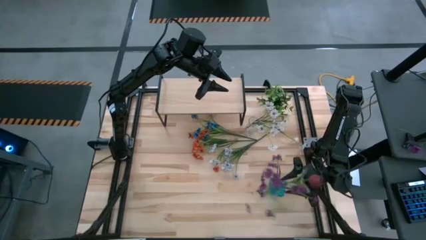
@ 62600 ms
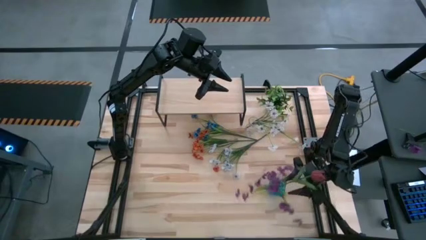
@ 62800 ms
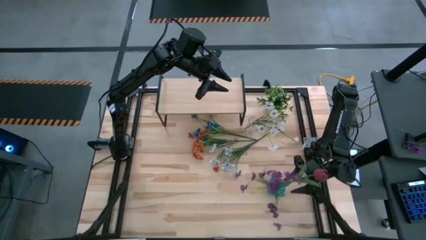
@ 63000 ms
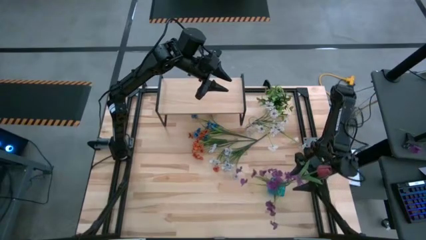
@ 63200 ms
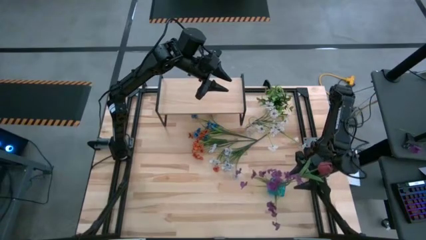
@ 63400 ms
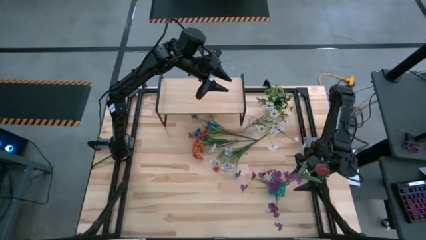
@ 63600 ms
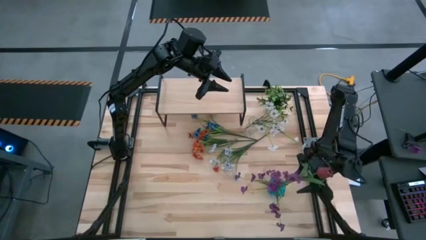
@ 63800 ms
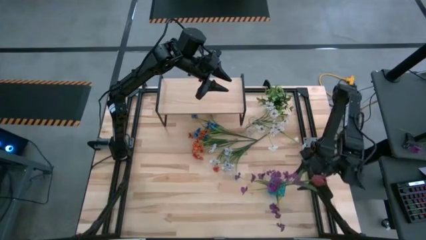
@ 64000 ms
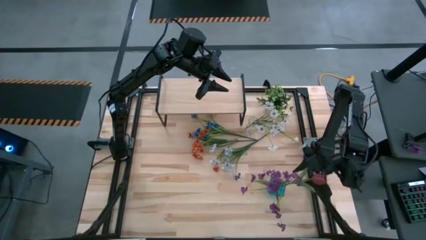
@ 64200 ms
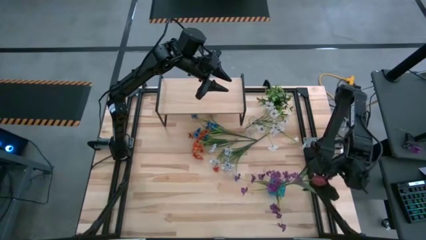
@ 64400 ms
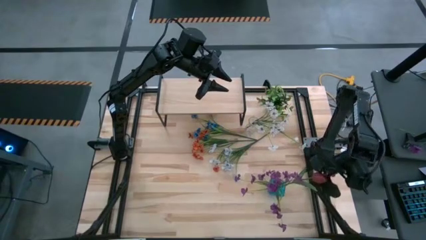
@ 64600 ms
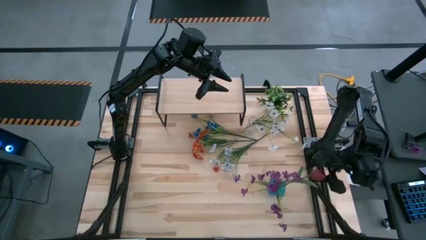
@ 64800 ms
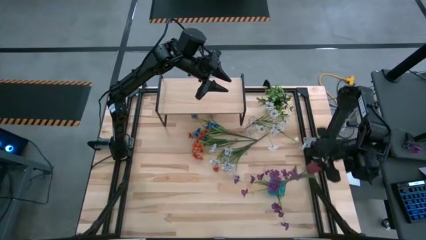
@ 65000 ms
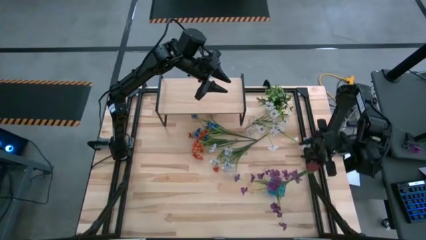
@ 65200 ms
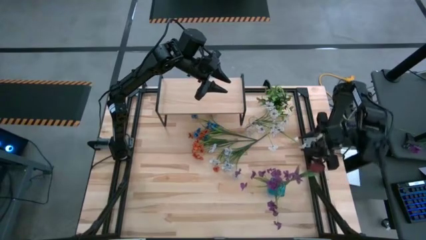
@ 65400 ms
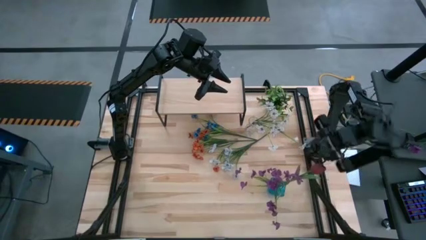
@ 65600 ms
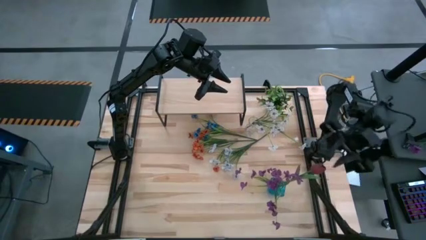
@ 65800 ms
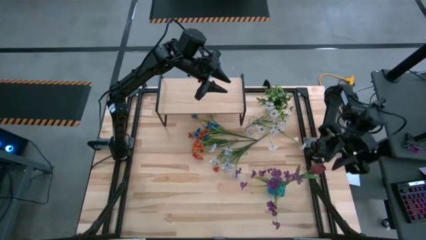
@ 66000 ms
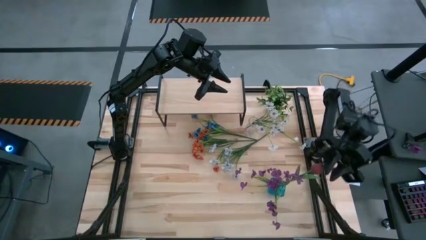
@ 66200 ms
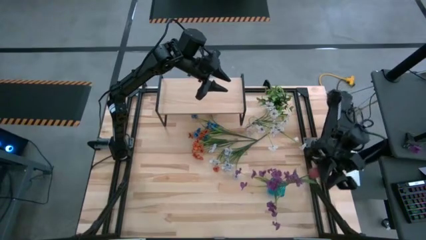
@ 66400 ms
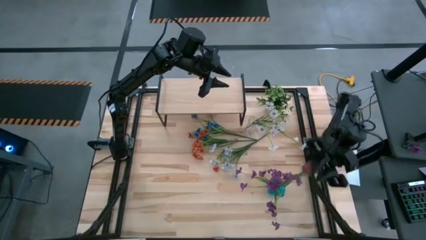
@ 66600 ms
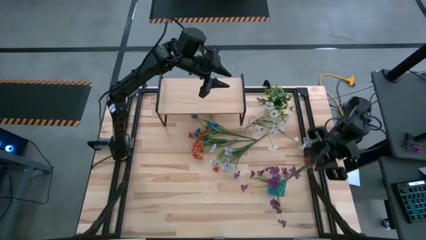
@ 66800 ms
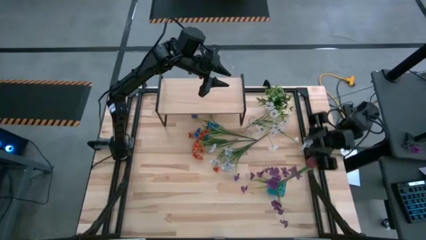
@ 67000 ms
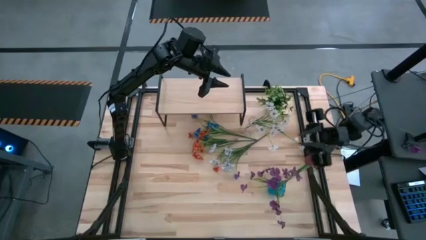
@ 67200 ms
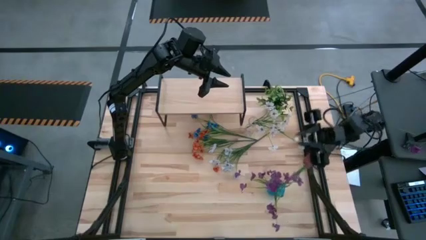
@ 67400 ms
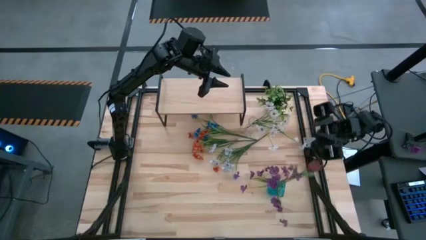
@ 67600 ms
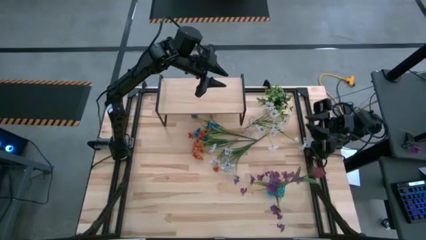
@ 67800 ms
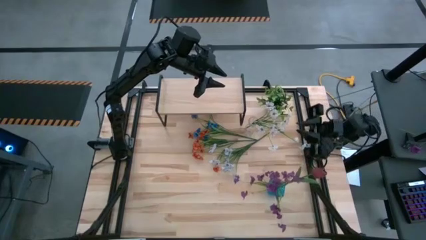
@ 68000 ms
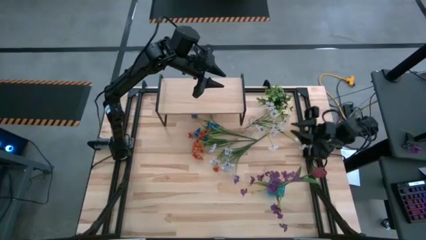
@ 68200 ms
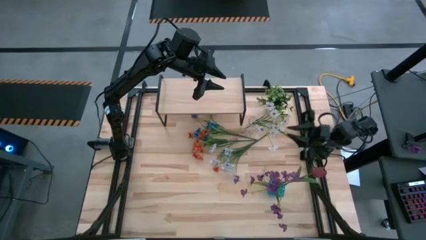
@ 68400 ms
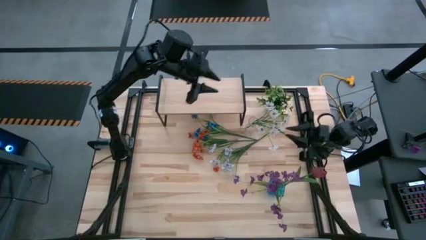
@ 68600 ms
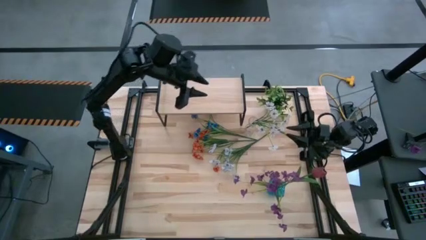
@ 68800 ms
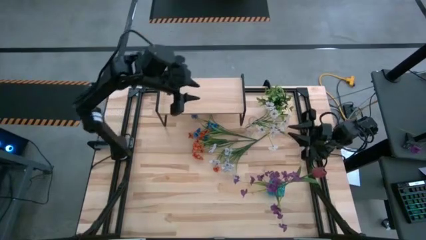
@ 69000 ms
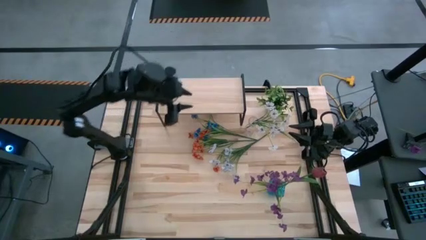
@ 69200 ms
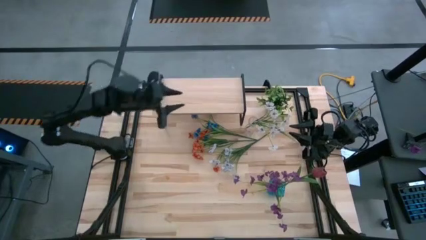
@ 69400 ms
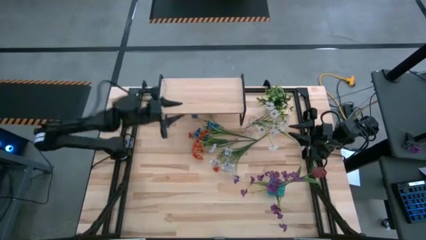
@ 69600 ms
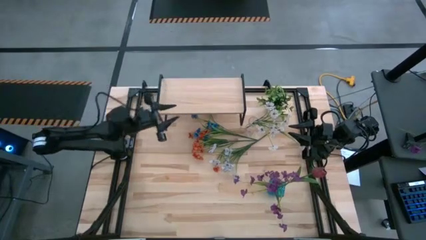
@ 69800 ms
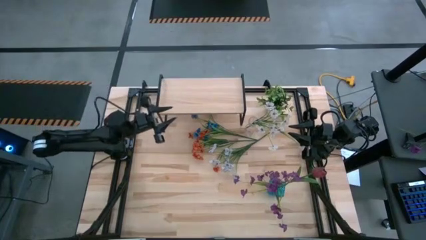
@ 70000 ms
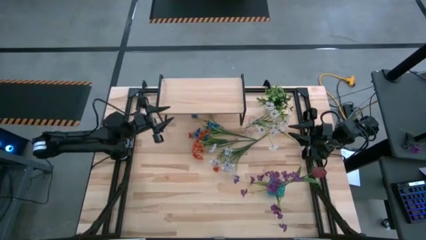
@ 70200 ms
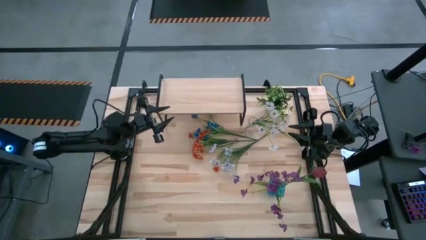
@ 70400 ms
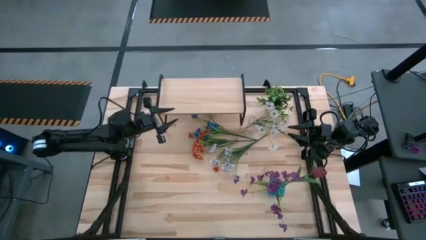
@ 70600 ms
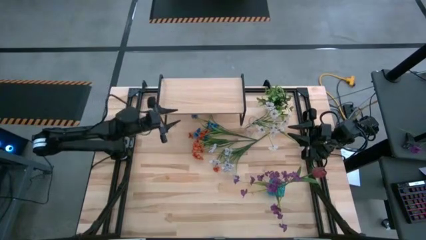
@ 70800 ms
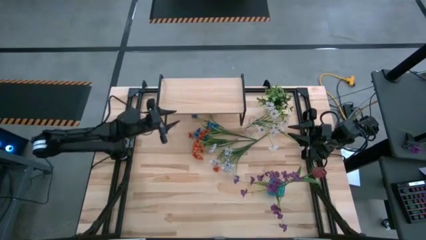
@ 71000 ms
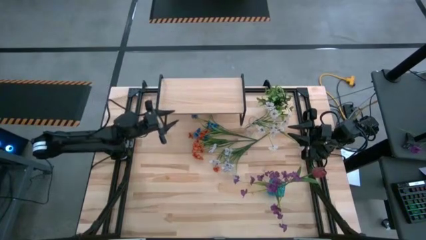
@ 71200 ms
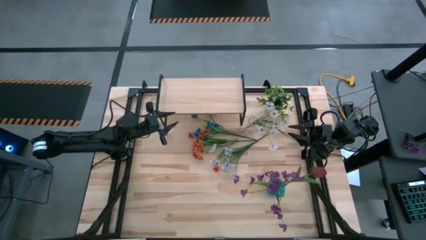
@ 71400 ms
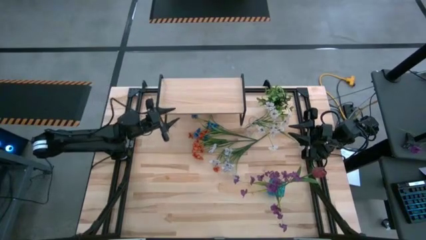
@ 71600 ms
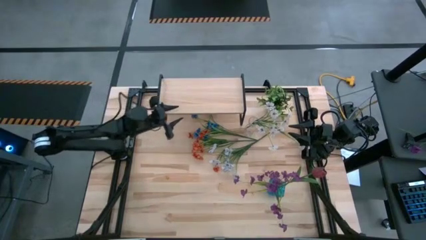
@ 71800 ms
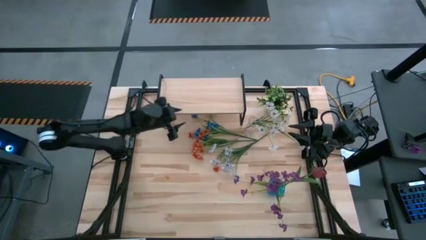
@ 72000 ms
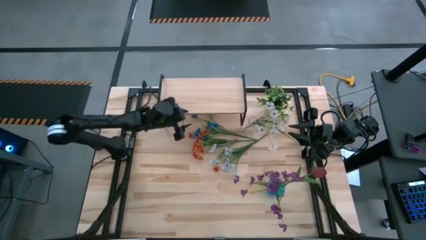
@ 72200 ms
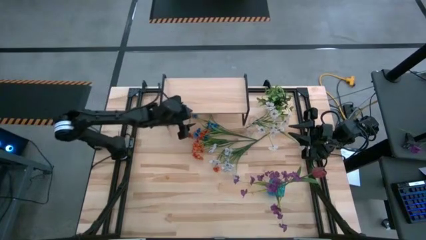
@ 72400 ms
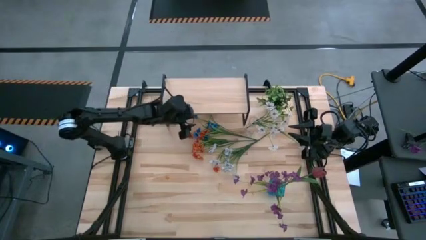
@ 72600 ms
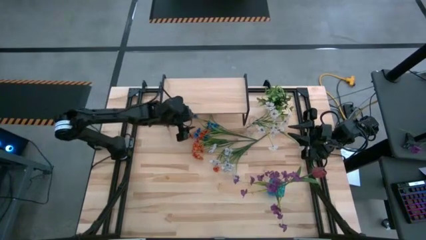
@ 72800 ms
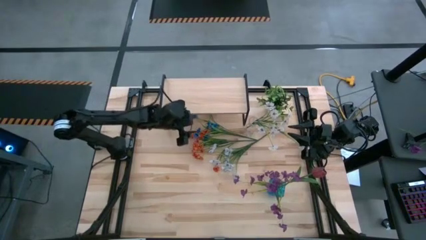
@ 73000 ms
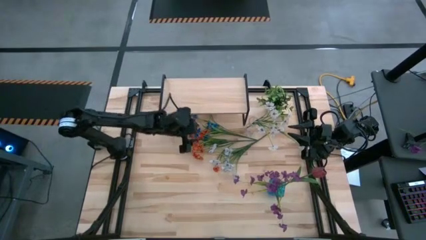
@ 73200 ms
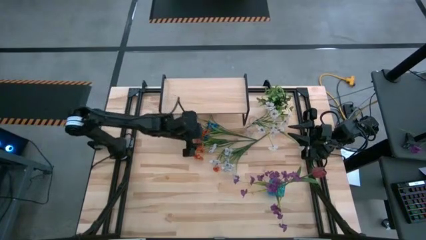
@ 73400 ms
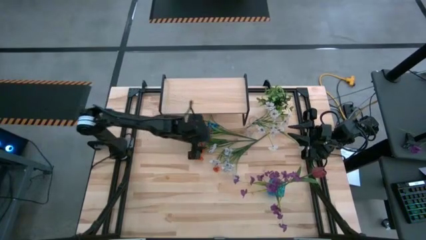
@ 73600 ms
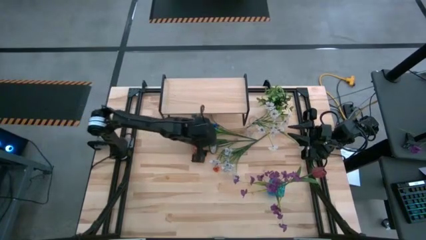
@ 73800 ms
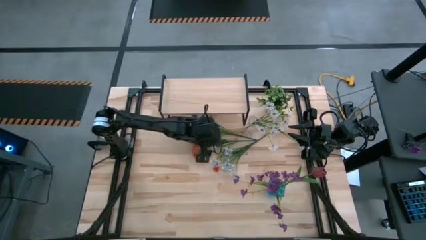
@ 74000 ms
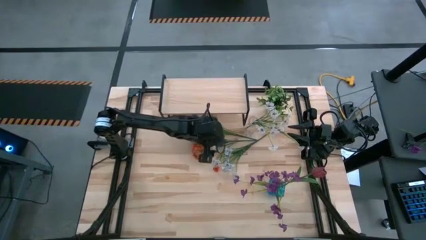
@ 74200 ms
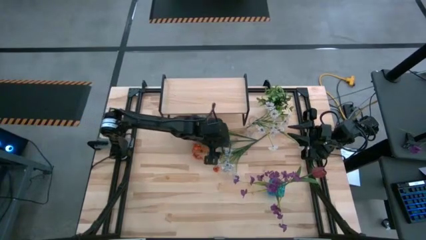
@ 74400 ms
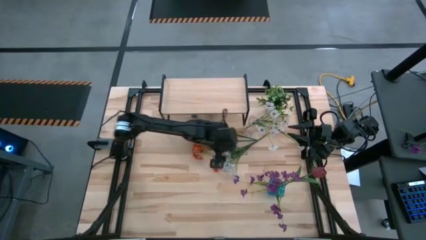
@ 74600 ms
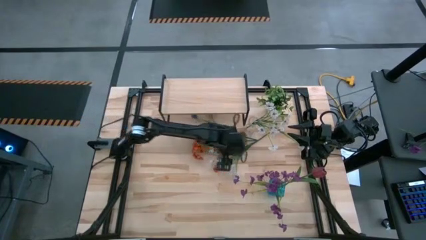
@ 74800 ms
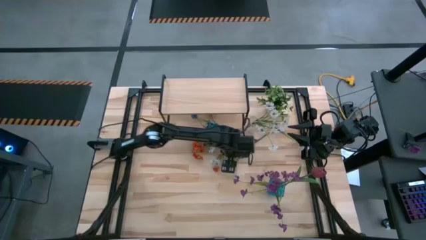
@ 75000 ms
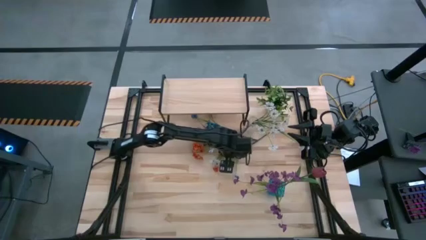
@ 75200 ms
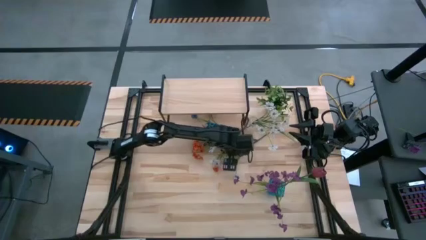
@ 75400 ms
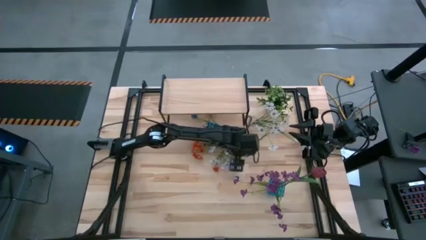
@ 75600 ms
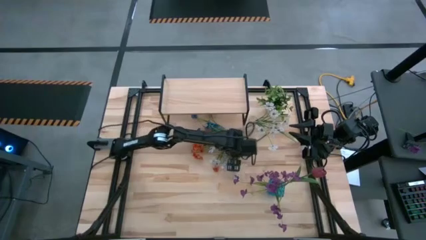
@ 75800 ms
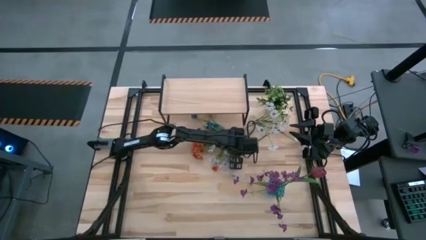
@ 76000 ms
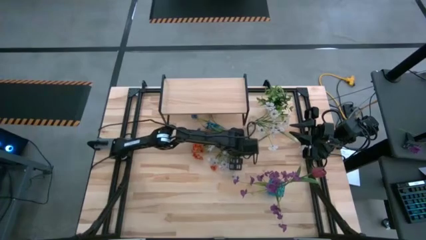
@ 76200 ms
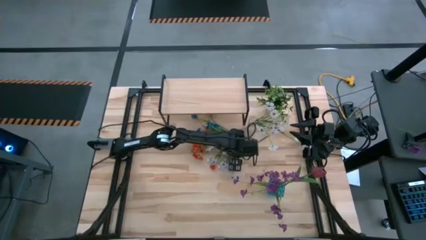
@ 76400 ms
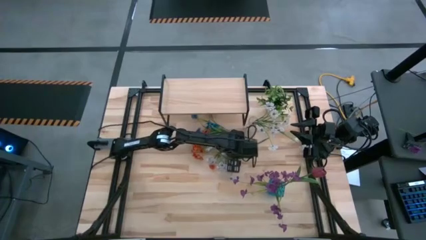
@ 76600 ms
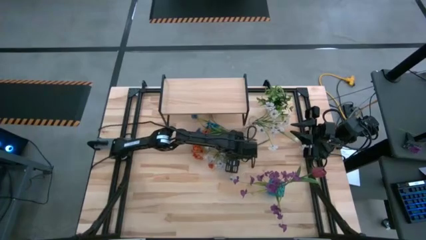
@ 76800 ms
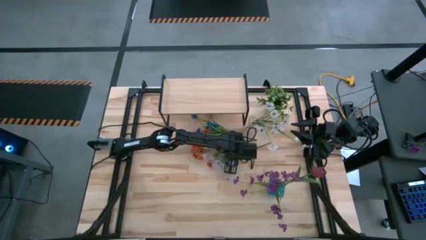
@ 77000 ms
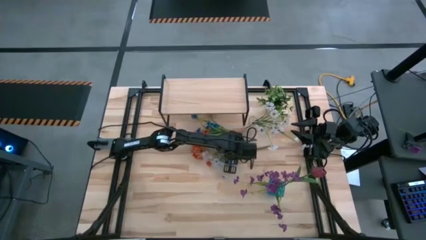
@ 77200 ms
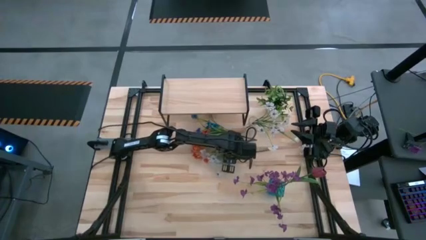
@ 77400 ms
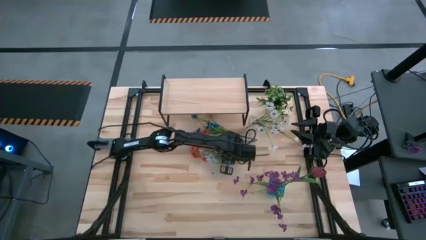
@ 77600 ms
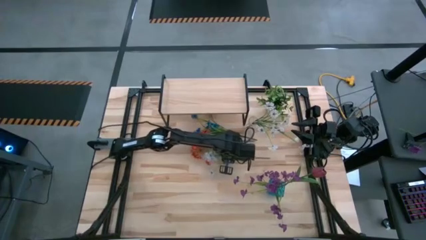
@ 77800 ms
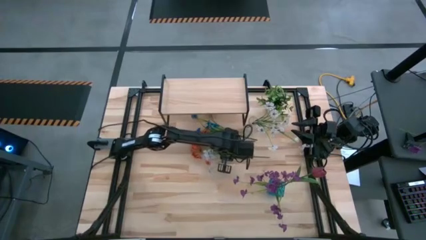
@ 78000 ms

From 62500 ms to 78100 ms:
Task: Pick and place flowers into a vace then onto a shelf
Put the white flowers into the blue flower vase
